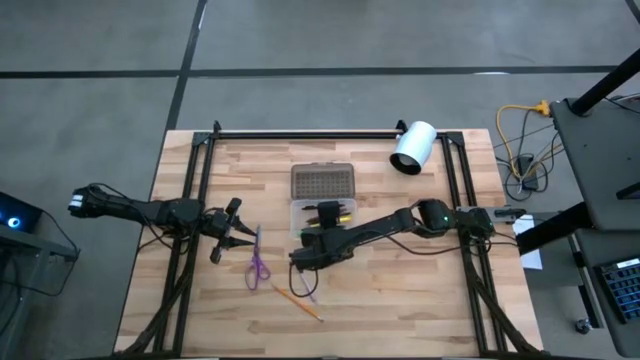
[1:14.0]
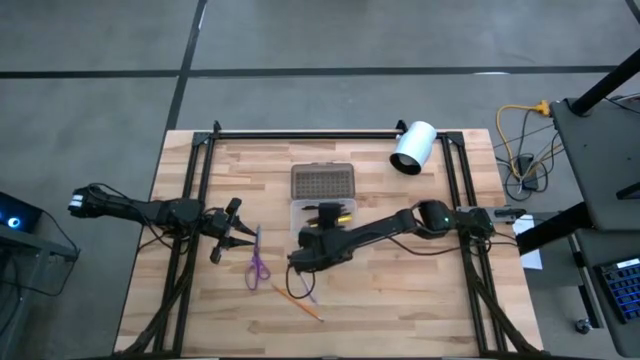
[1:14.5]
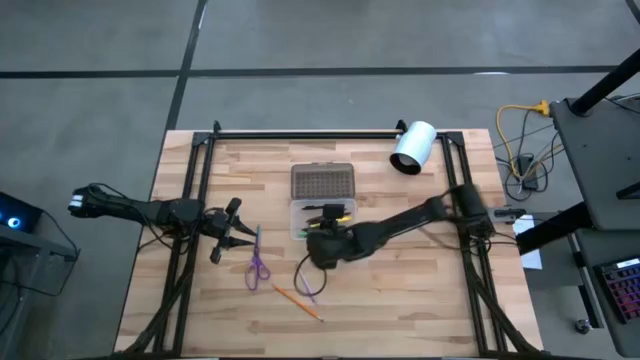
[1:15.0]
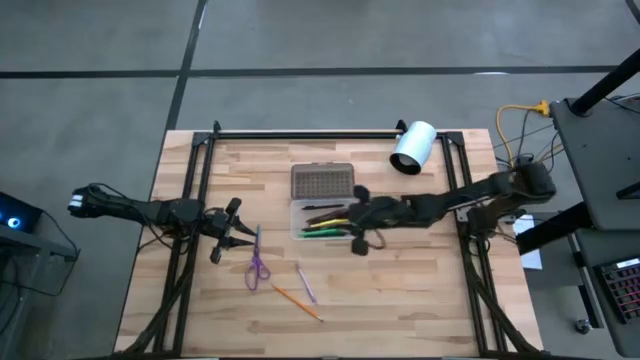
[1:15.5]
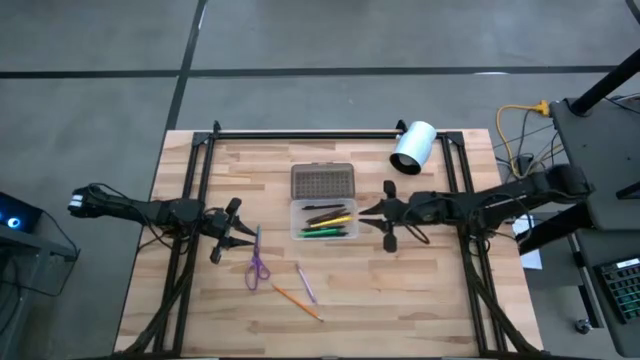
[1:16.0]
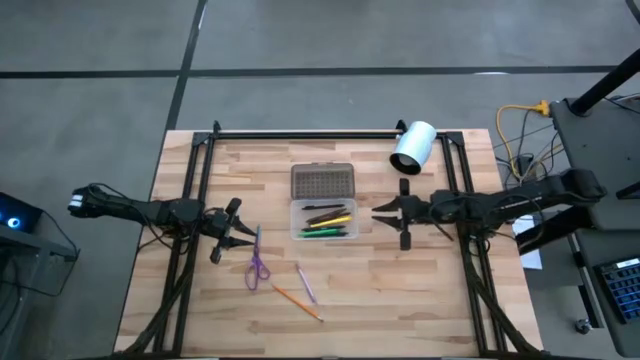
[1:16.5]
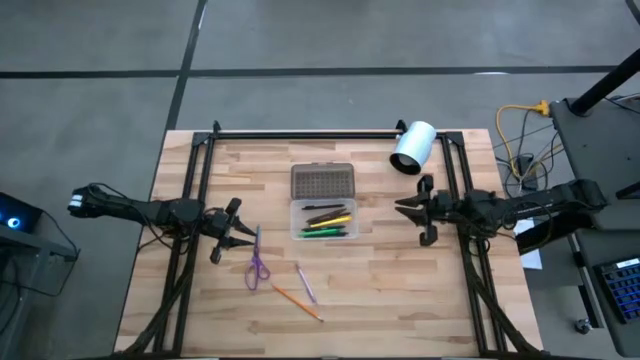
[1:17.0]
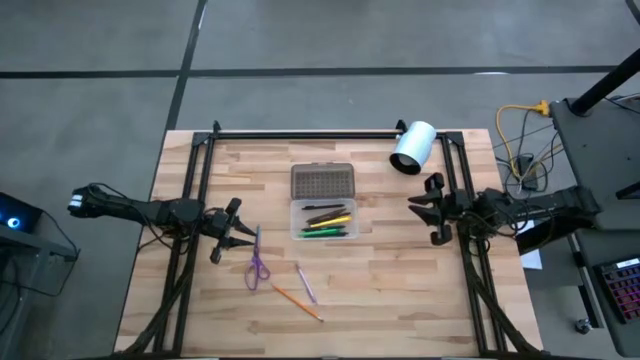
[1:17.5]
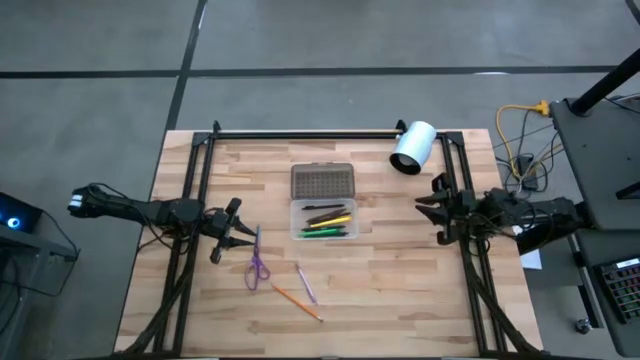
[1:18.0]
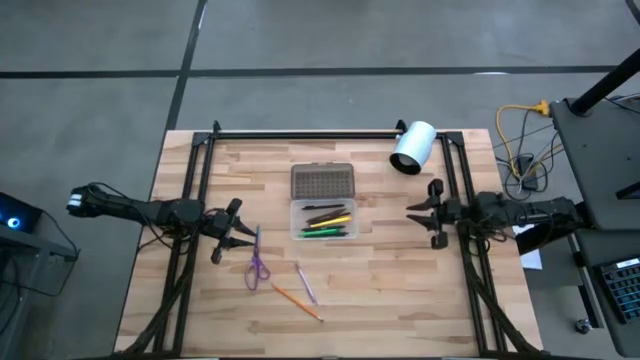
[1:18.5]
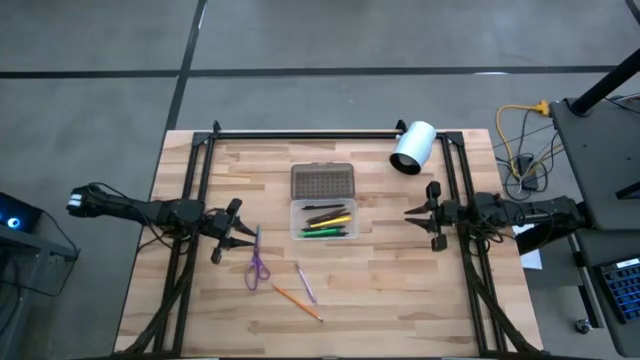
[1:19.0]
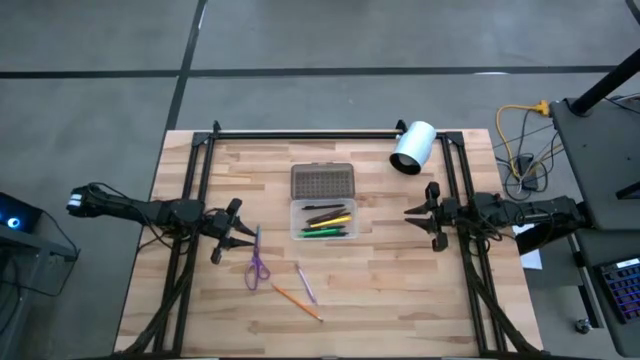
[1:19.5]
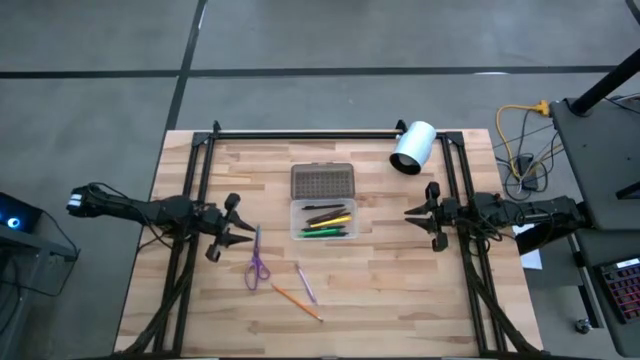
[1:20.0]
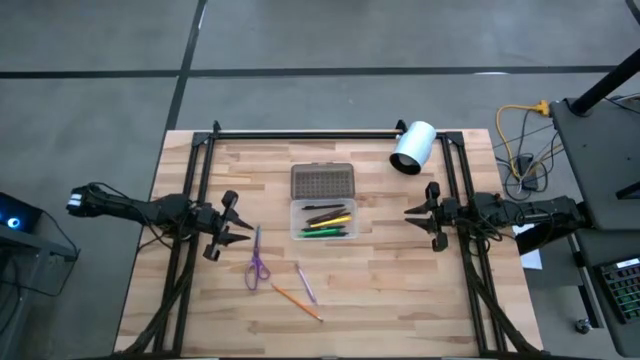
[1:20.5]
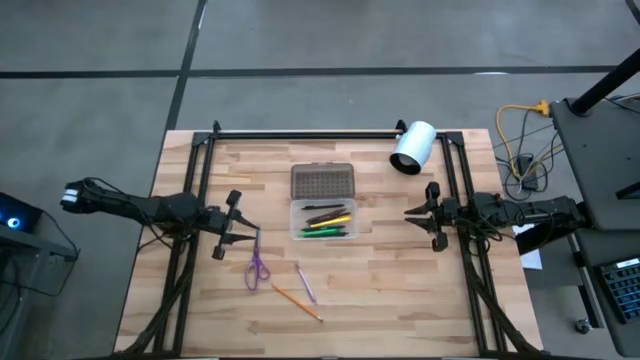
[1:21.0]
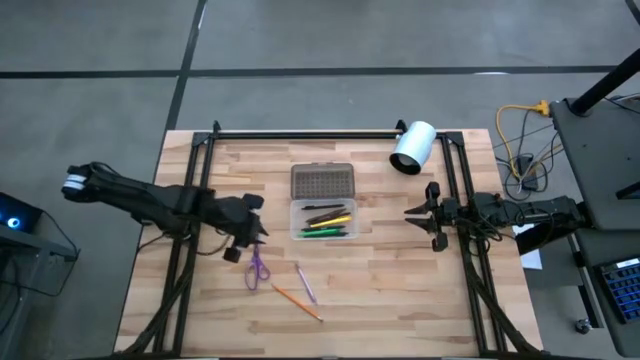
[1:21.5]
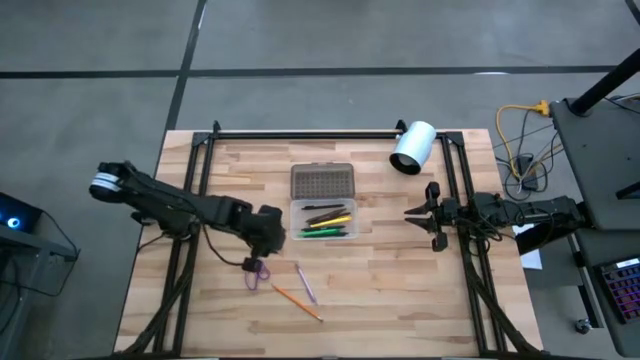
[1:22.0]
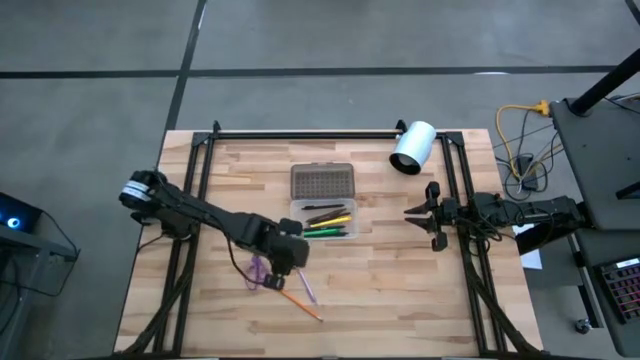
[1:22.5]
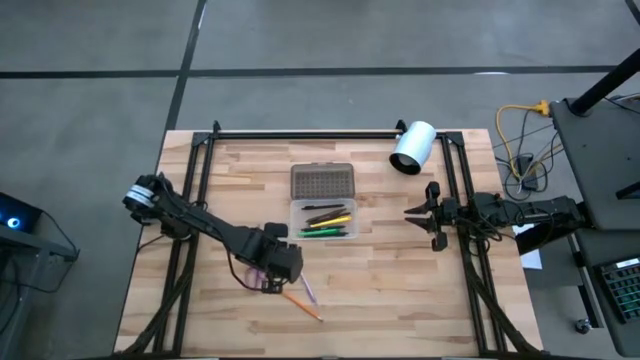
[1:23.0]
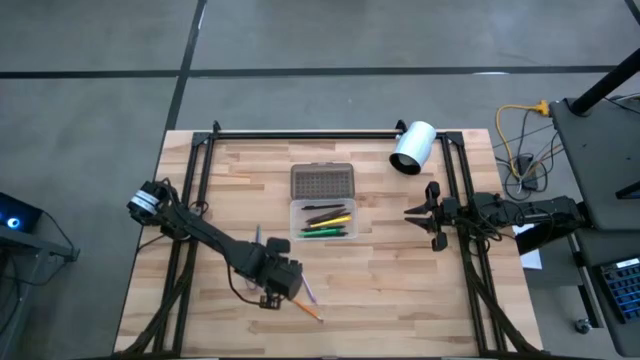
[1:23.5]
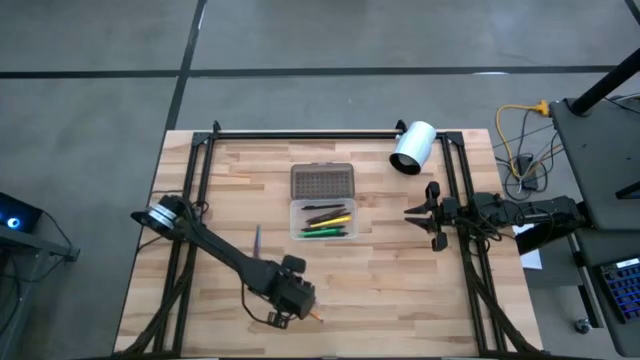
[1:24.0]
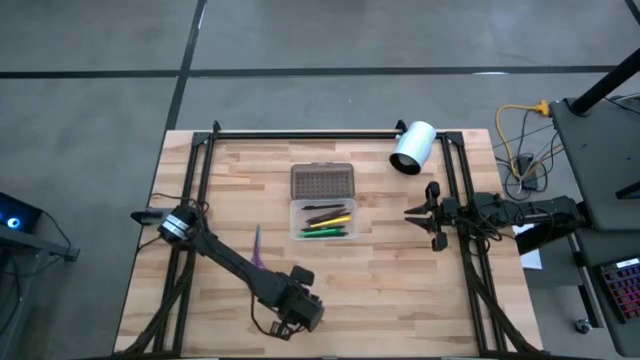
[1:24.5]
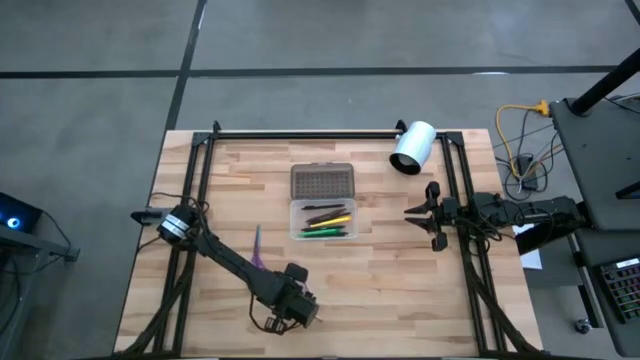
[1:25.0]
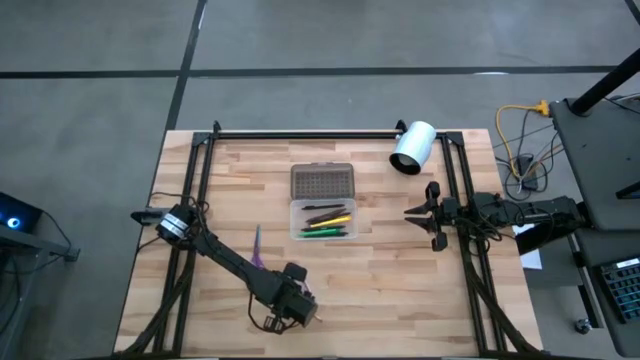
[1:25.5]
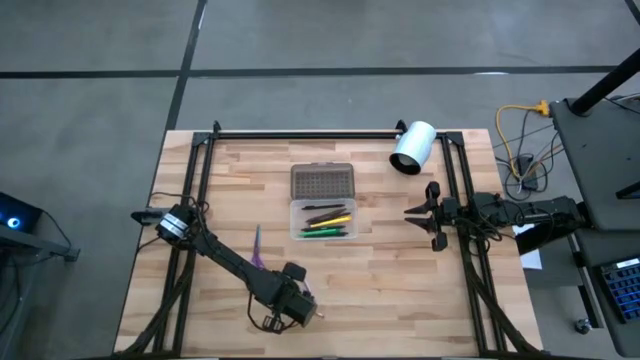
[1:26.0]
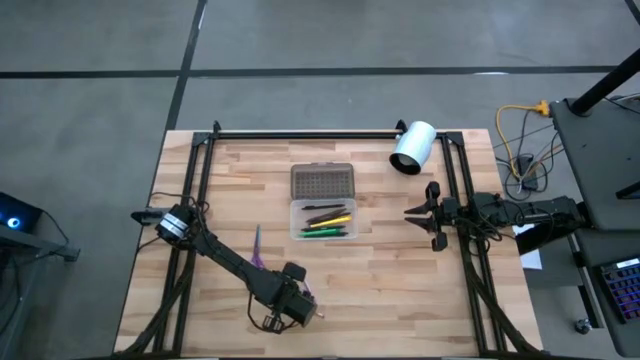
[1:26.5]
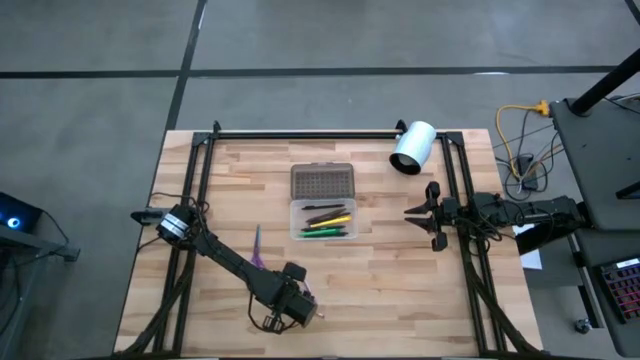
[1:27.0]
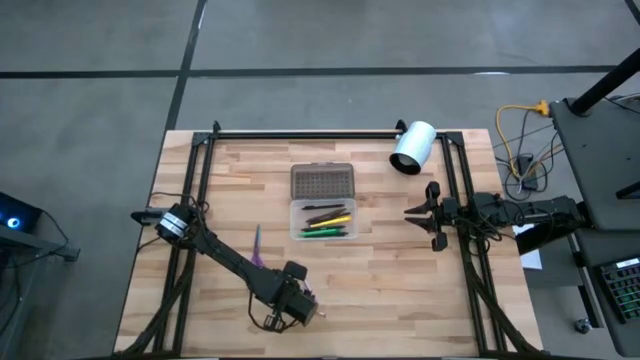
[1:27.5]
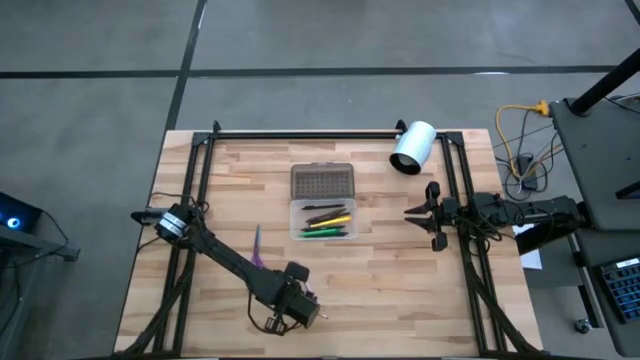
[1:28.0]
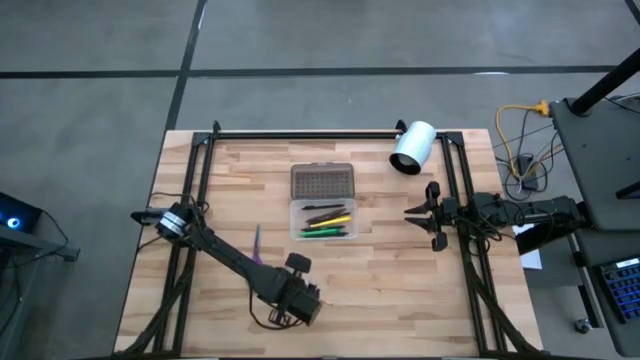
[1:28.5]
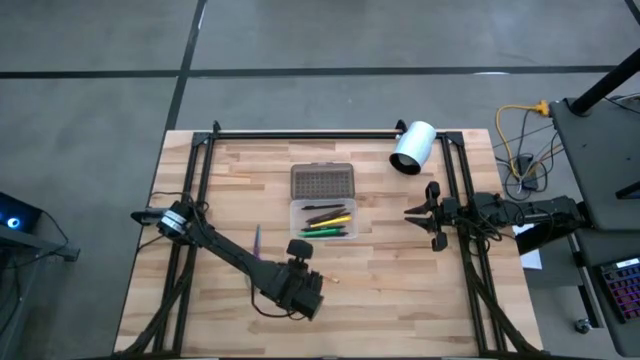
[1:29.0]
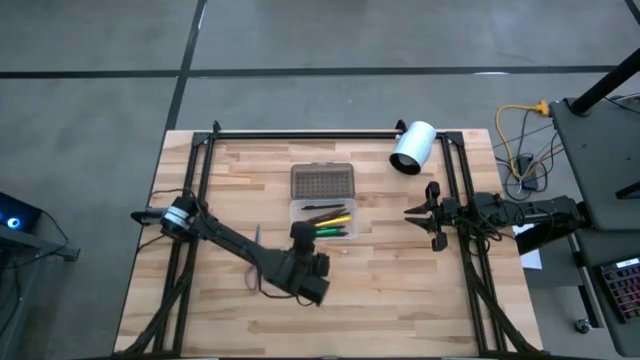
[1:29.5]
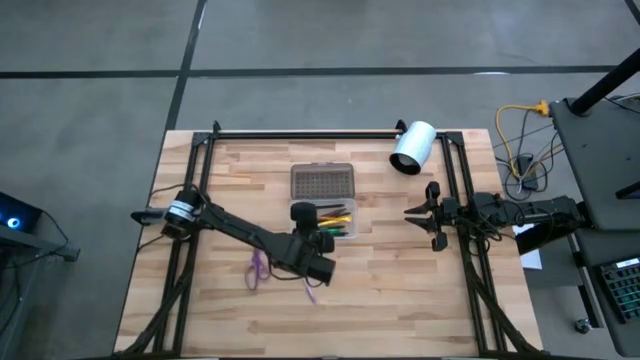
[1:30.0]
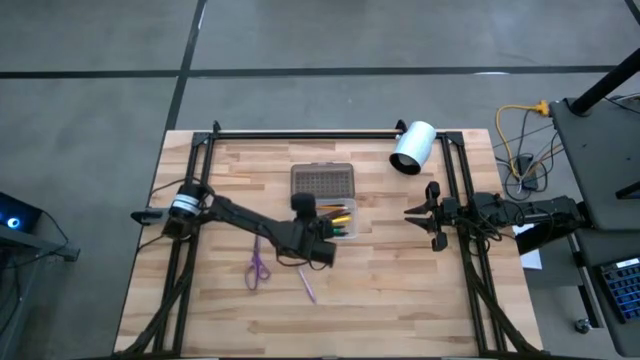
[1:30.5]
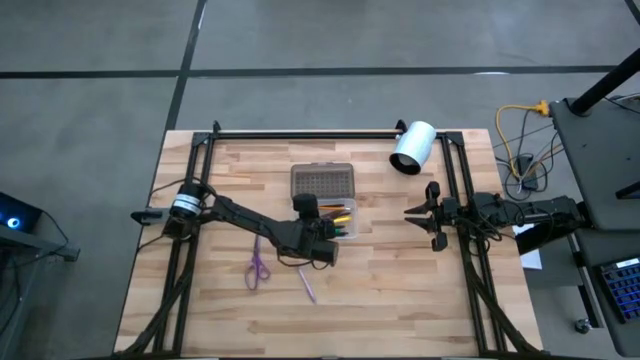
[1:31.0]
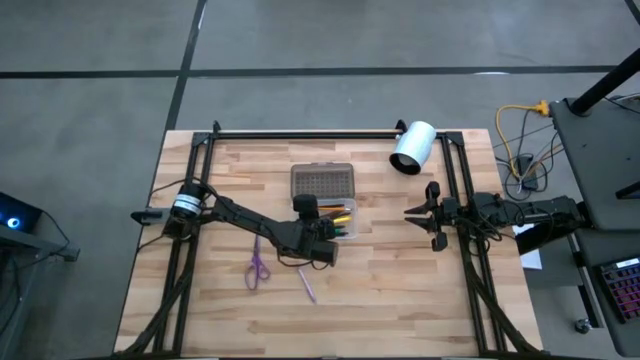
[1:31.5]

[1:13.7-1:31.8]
Task: Pick & place school supplies into a supply box
Put the orange pencil into the supply box

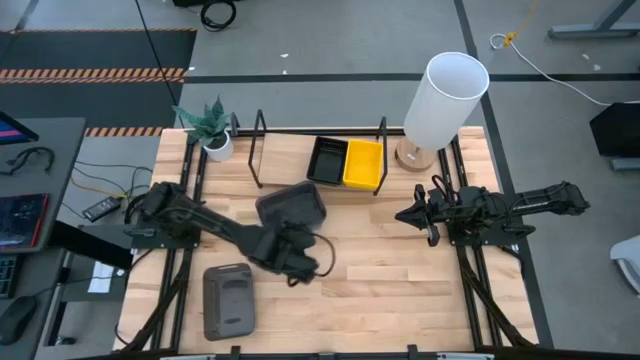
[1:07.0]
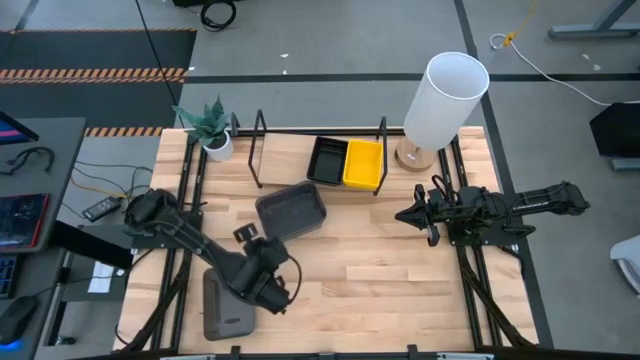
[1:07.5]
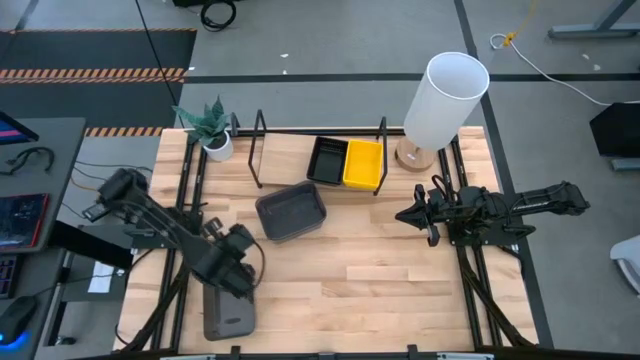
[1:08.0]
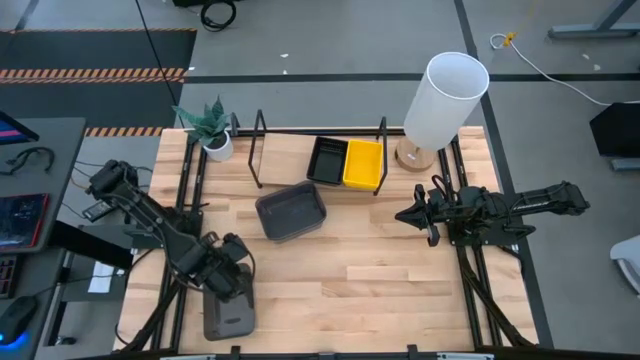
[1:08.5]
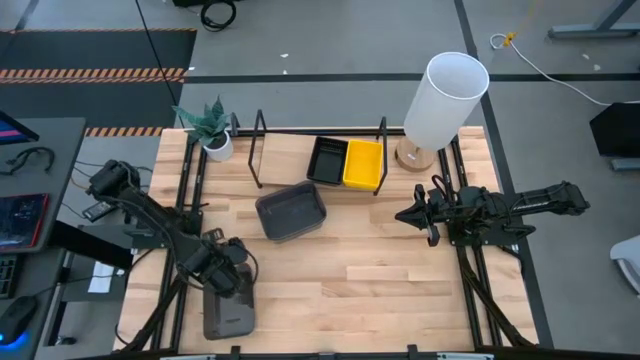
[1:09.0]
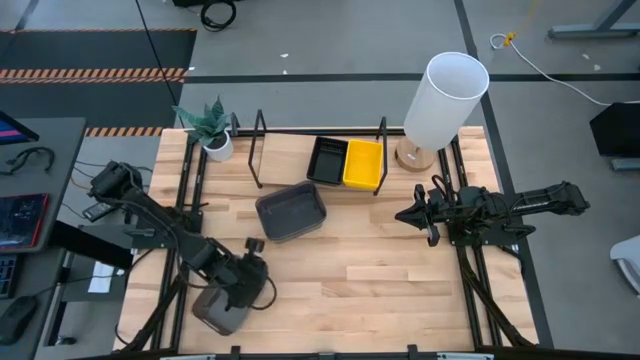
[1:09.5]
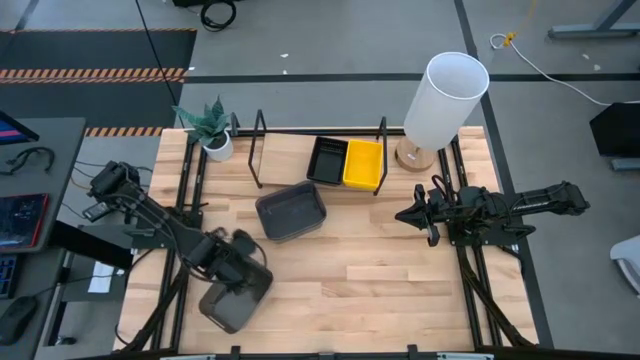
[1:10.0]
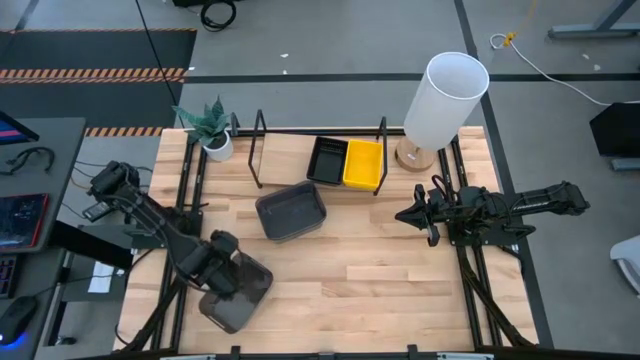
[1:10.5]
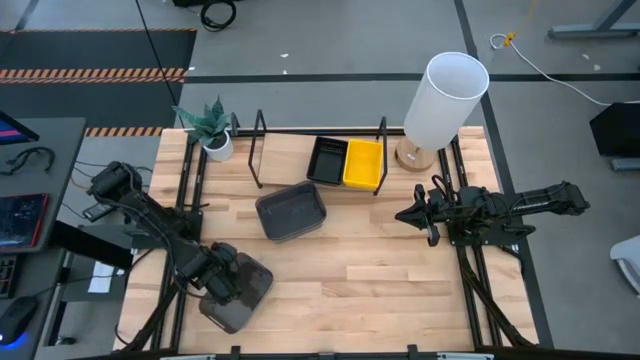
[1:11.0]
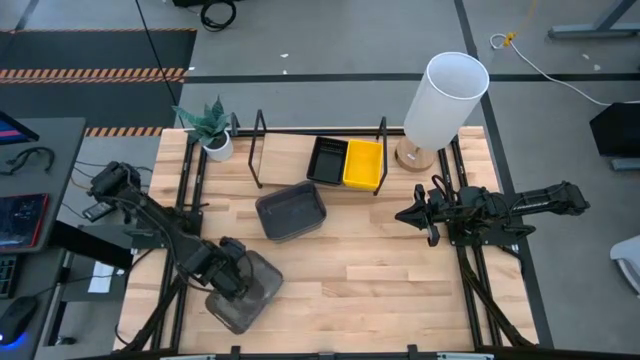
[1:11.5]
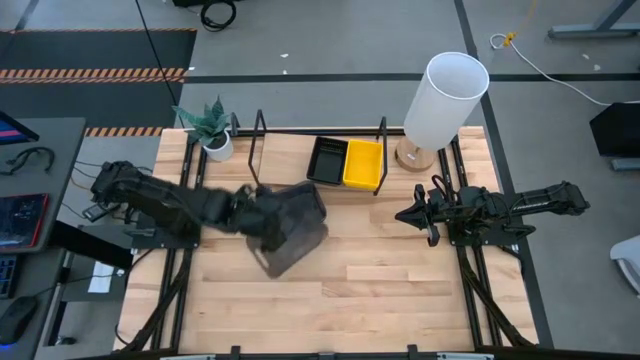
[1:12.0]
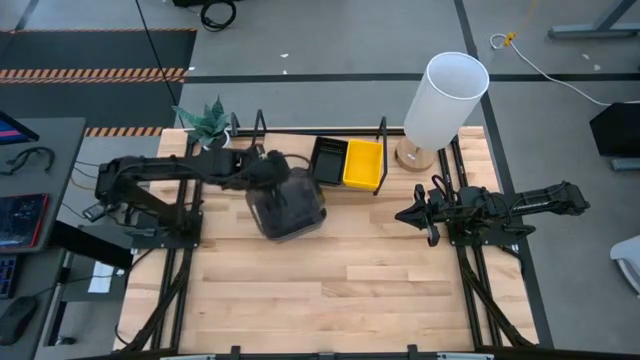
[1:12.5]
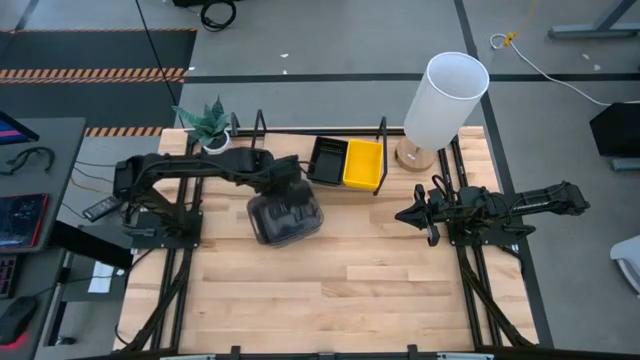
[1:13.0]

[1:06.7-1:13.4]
Task: Stack baskets on shelf by color
Stack the bottom transparent black bin on top of the top transparent black bin
